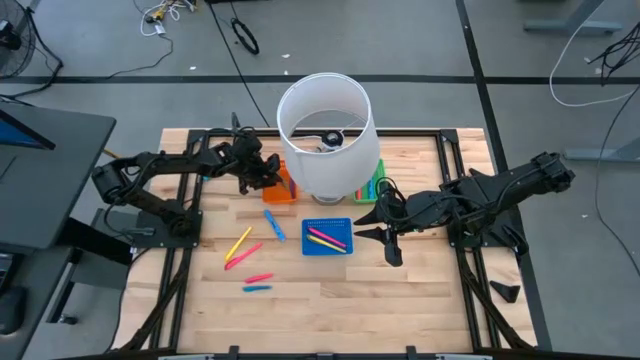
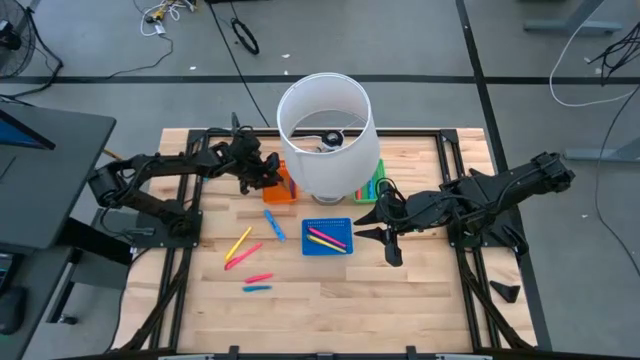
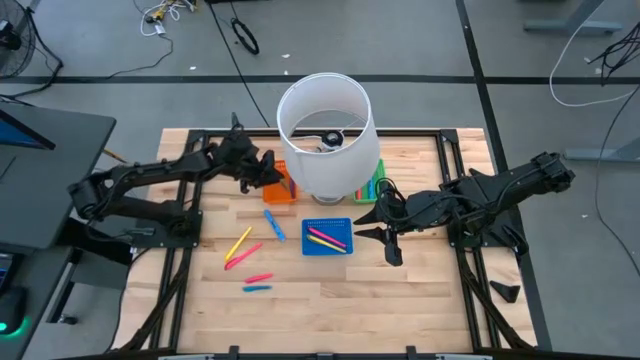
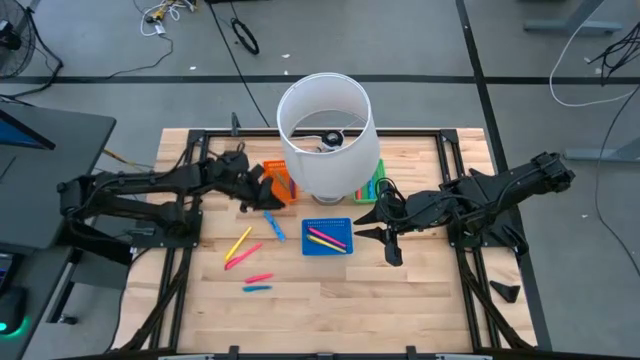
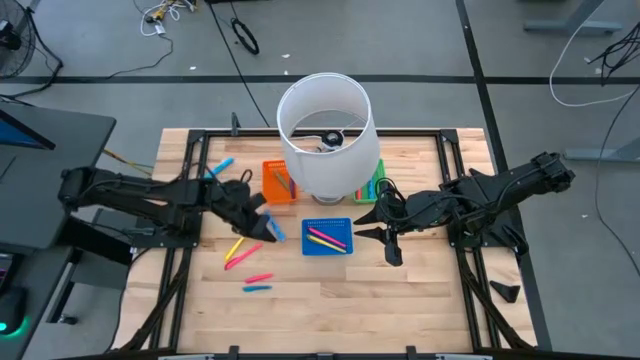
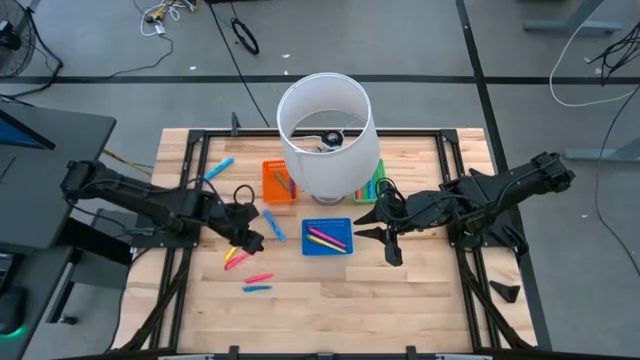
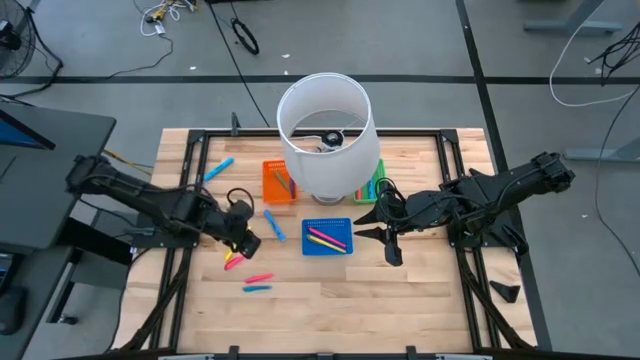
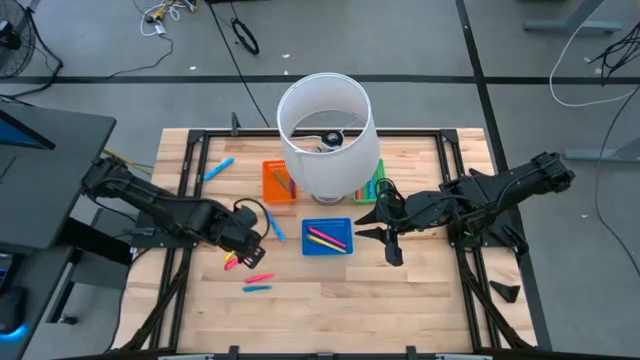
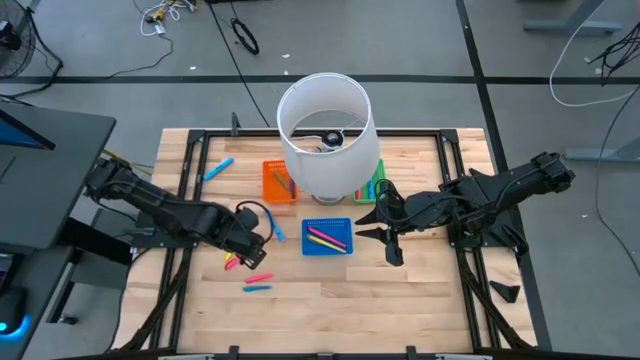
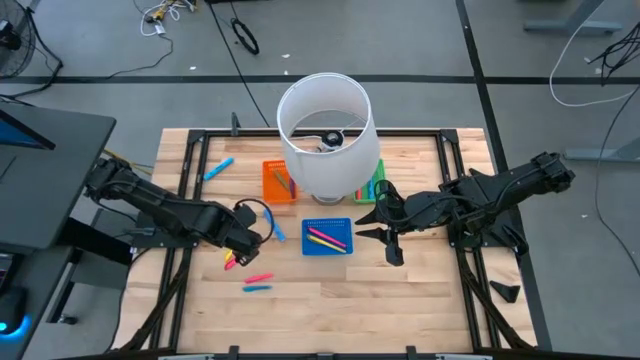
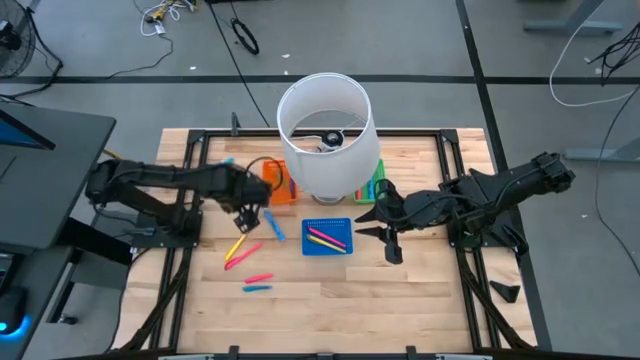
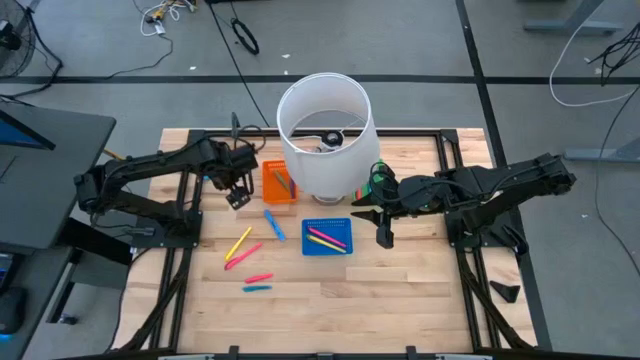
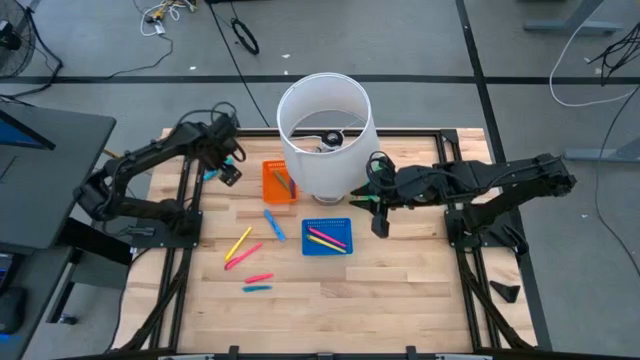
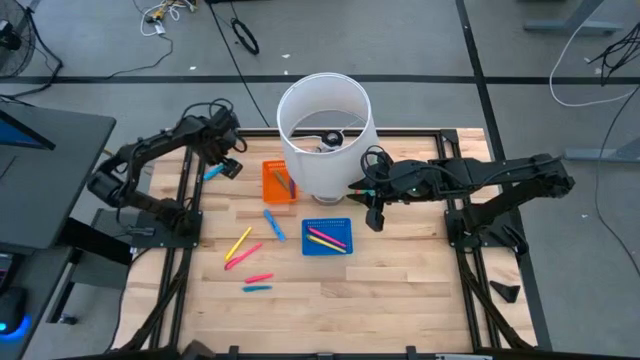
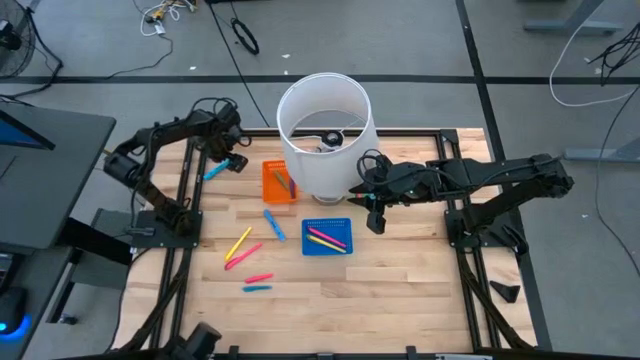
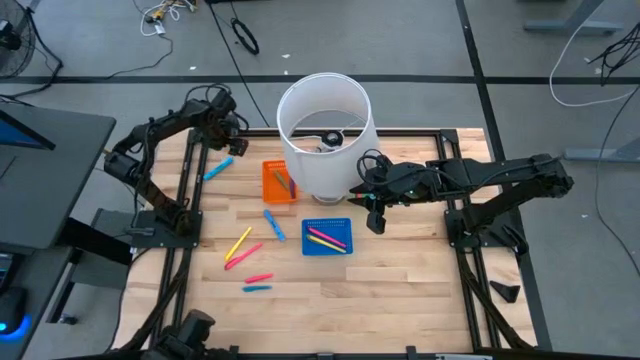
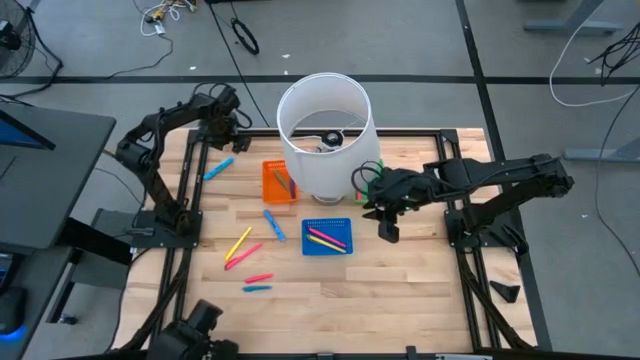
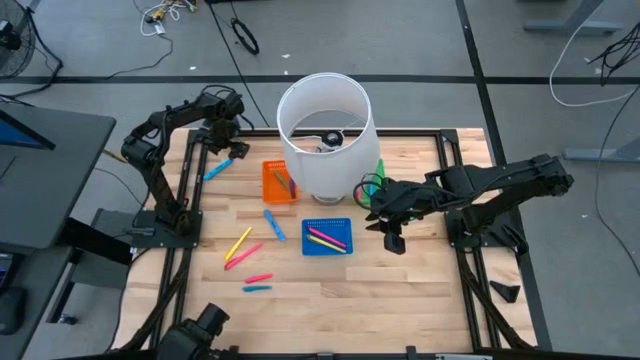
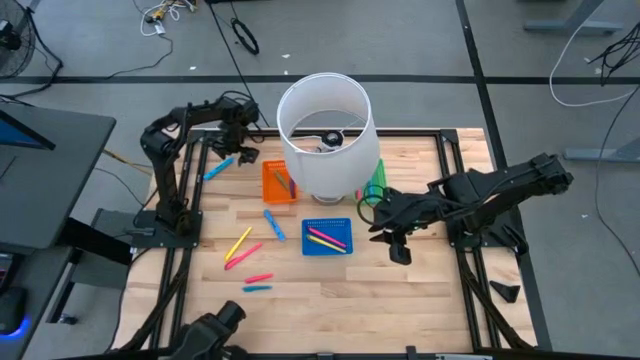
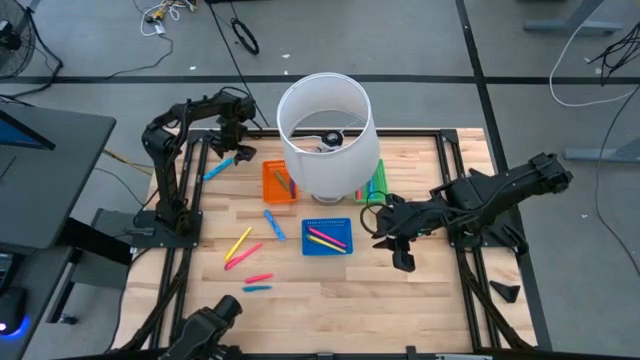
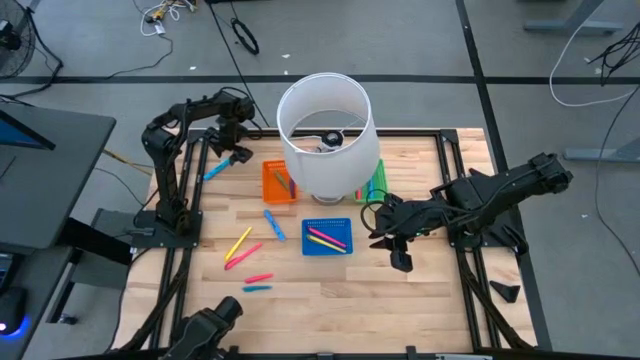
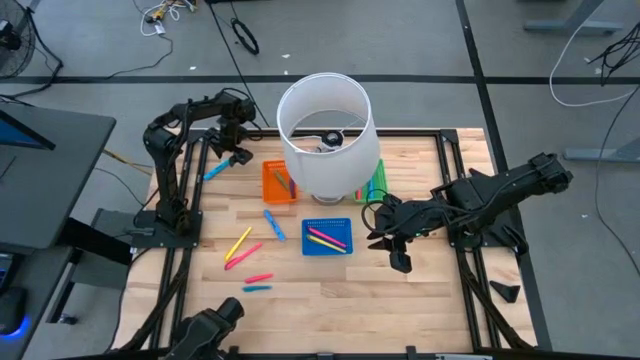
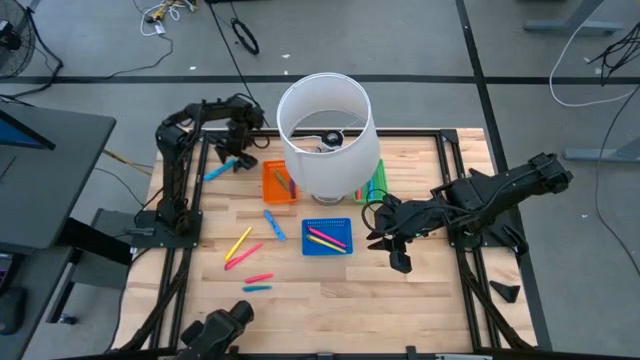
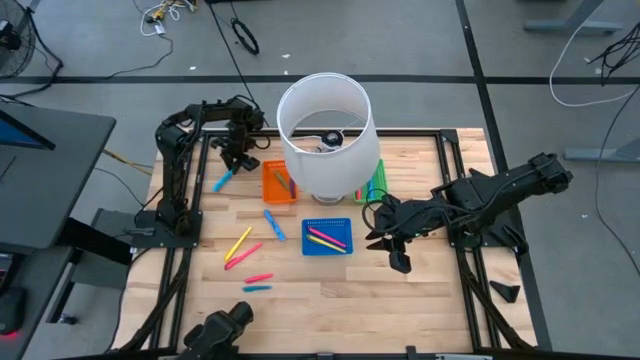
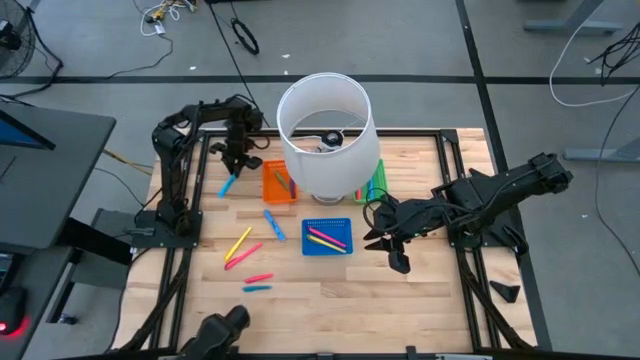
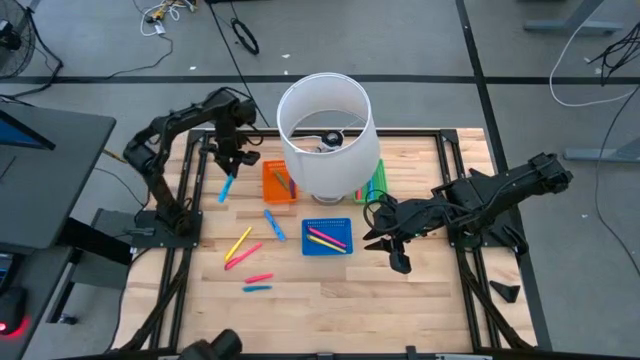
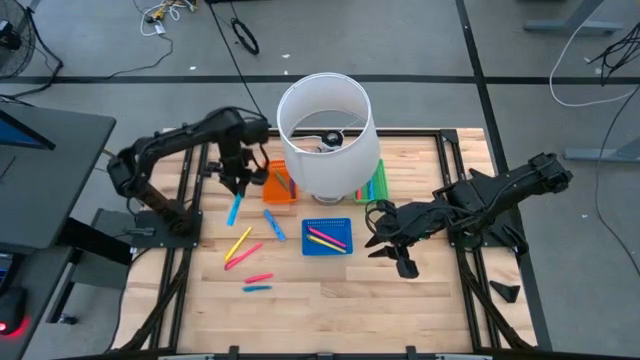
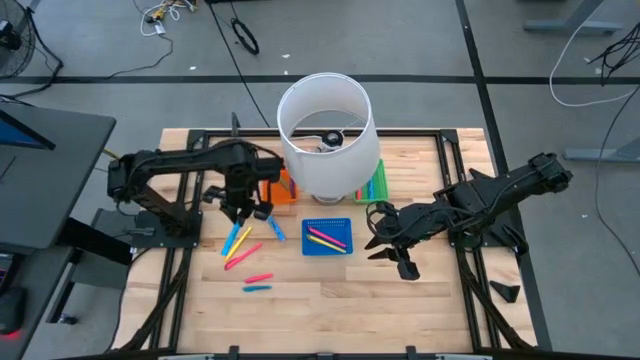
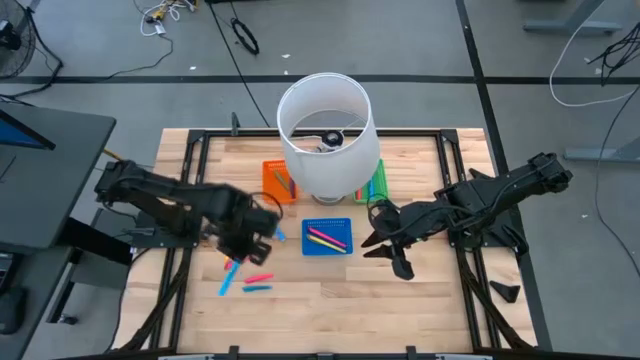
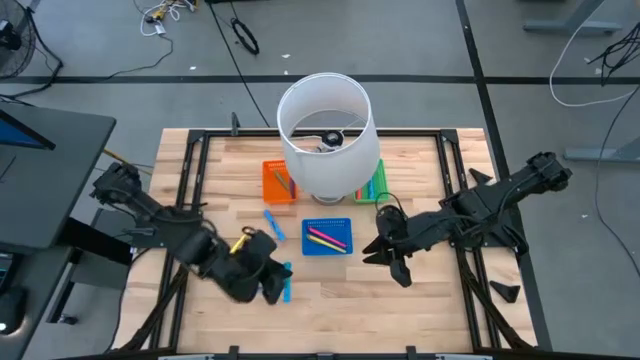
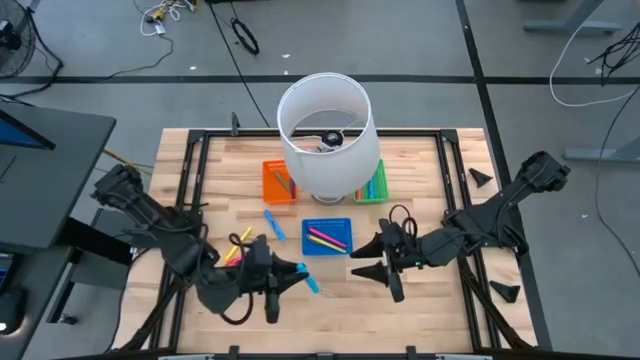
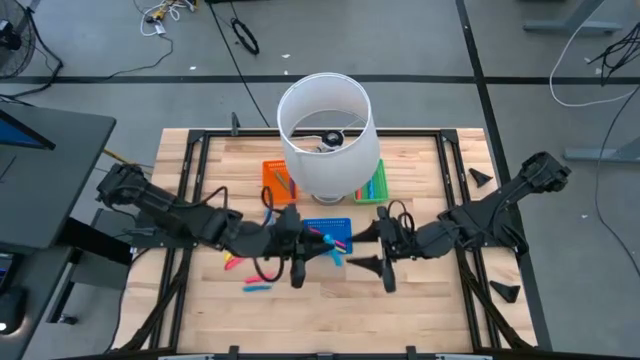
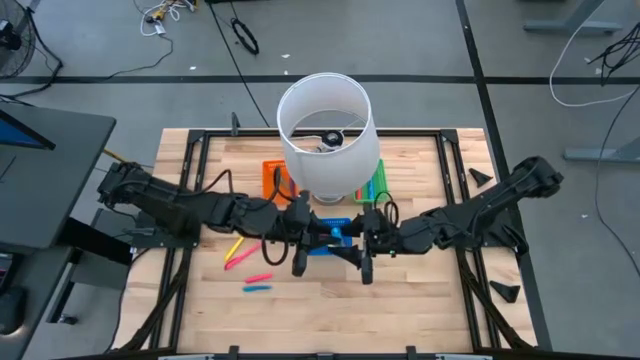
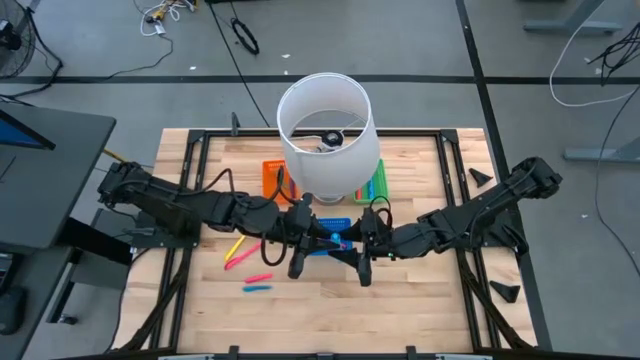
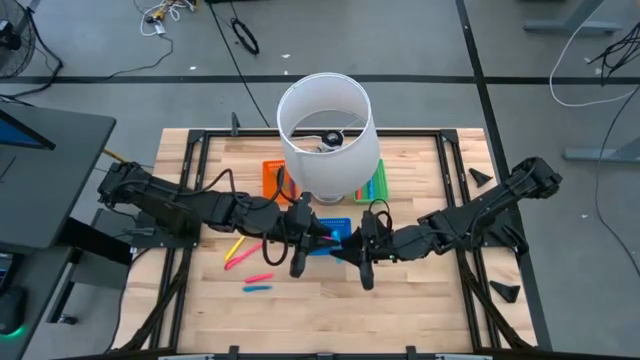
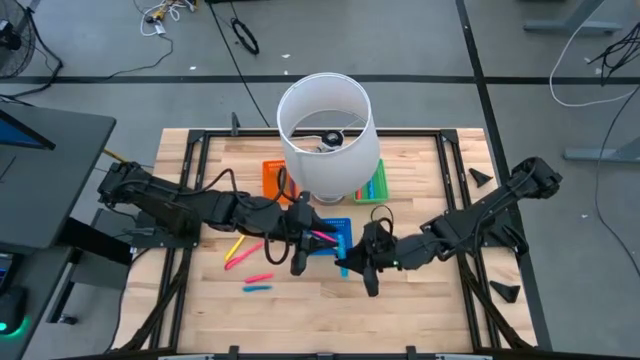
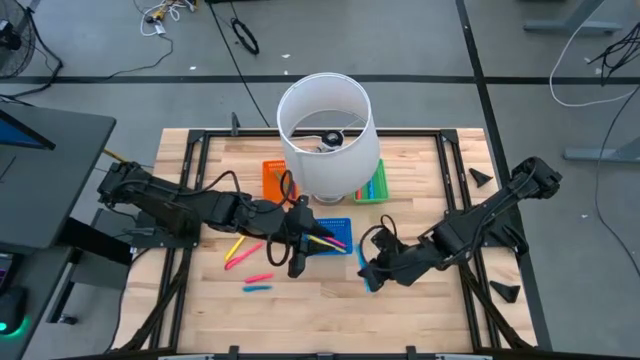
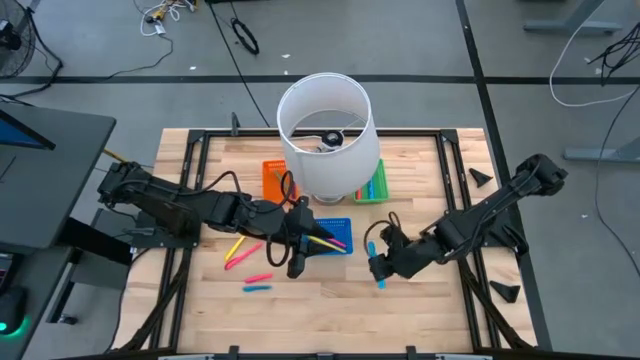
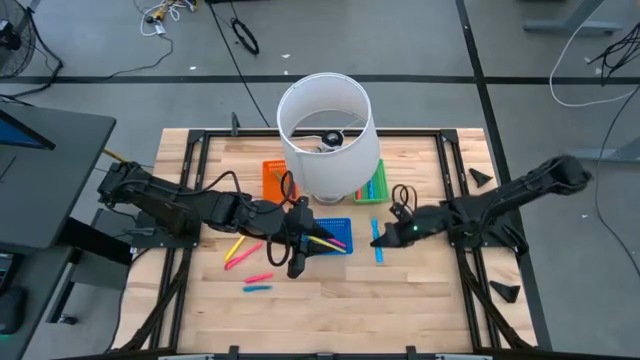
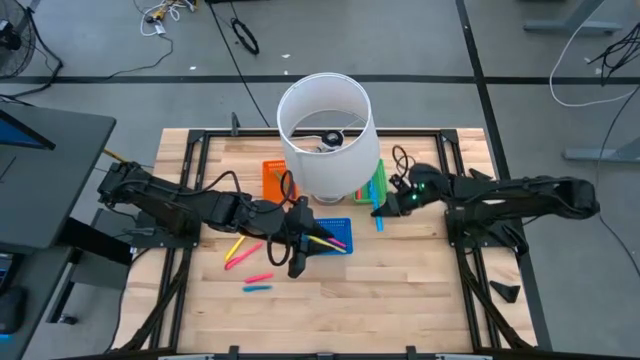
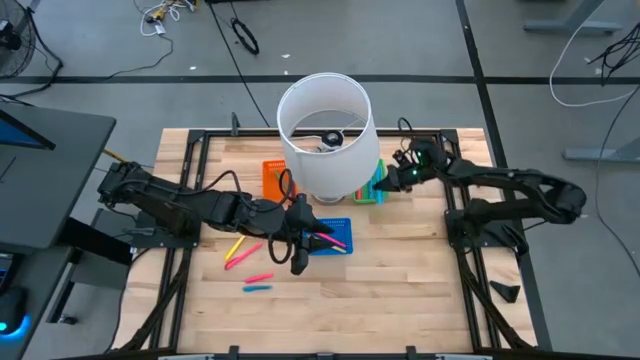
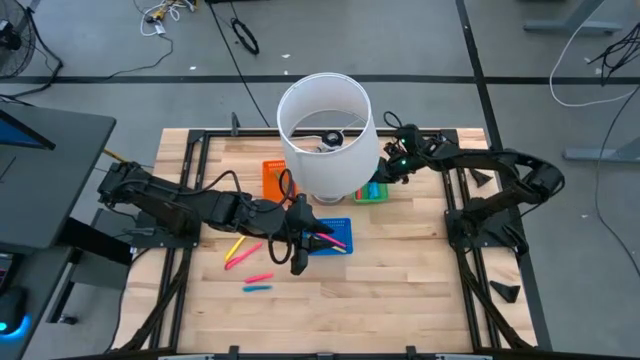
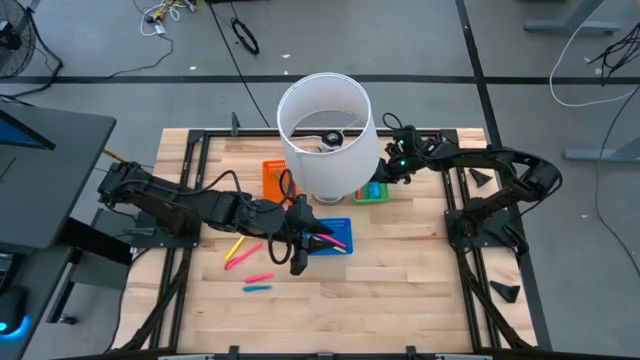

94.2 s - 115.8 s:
Task: Pick & Place Markers
Put the top blue large highlighter pen into the green bin
